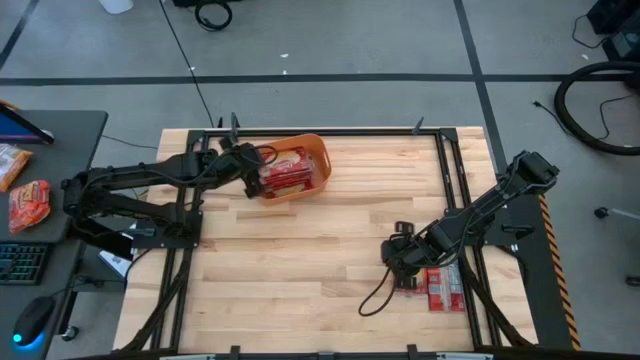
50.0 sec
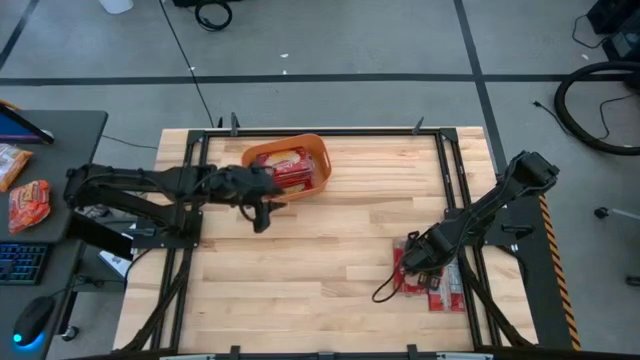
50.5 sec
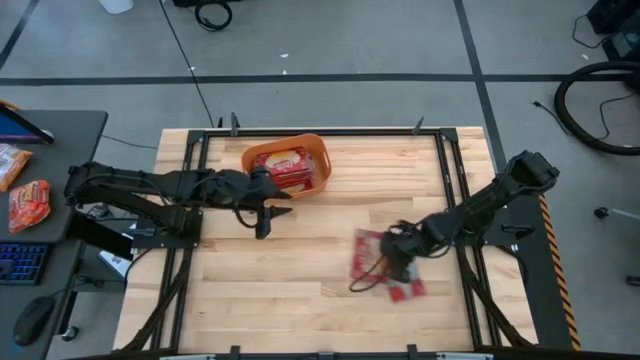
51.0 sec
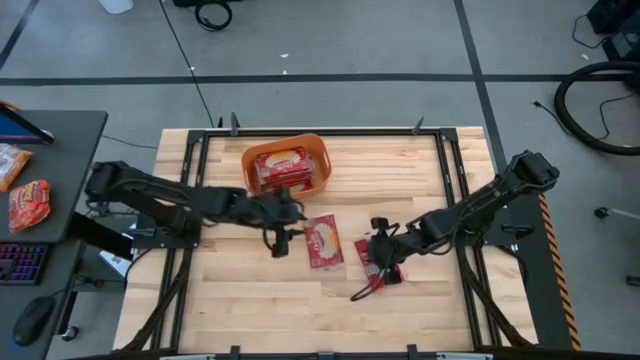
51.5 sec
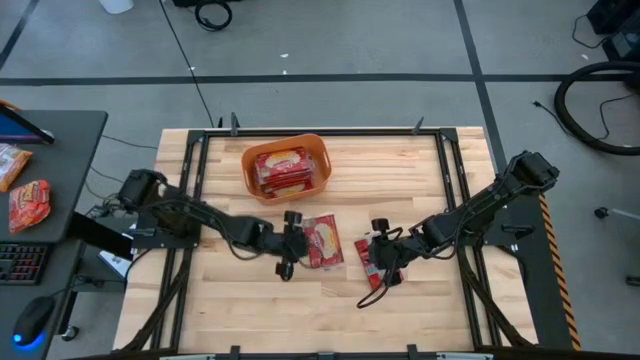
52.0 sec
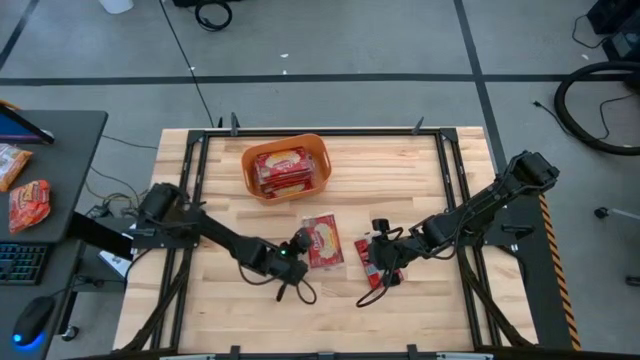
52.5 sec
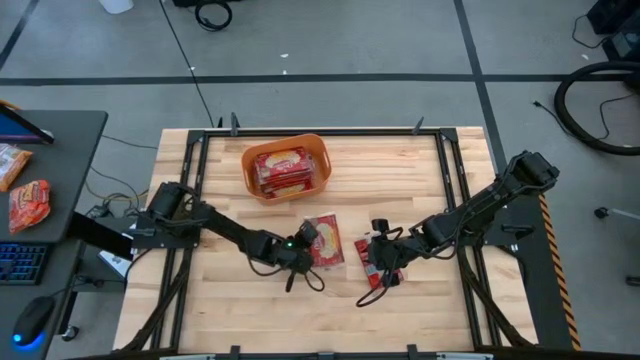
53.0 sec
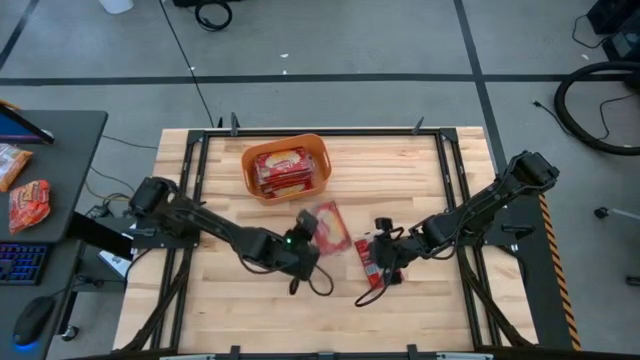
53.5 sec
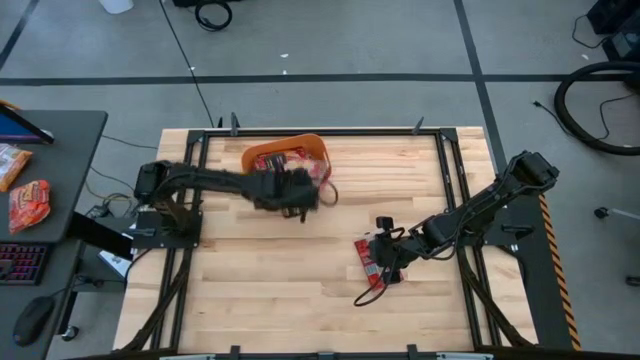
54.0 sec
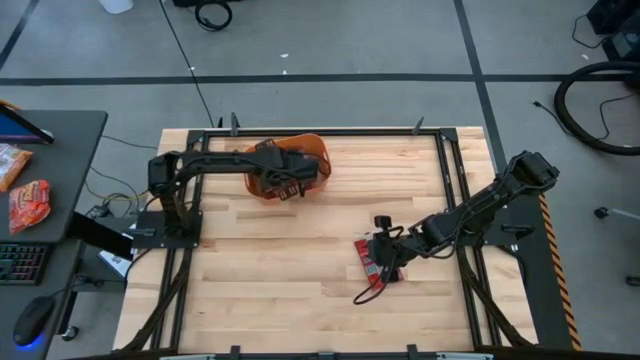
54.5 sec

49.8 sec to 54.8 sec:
Task: Sort popcorn bags into baskets
Put the popcorn bag into the orange bin

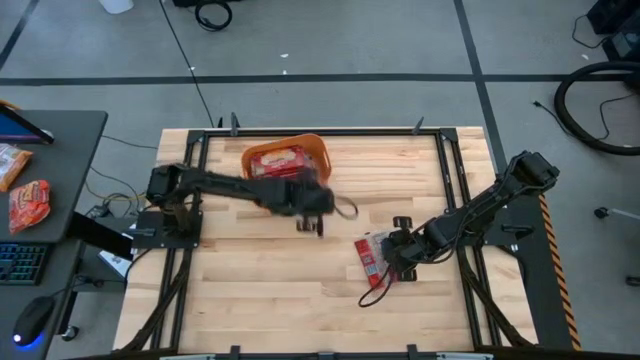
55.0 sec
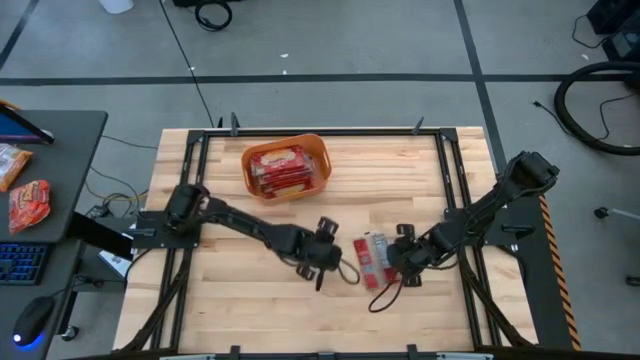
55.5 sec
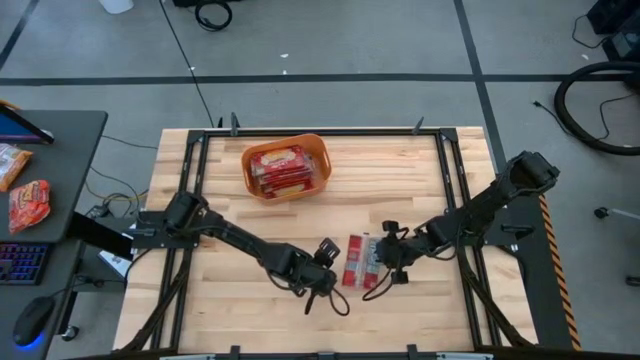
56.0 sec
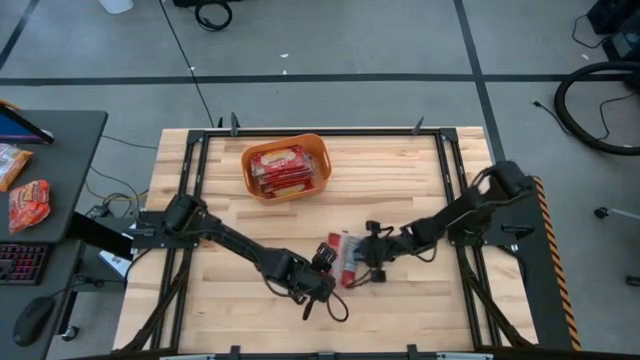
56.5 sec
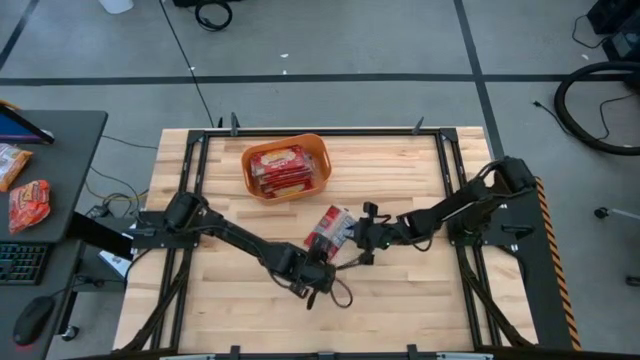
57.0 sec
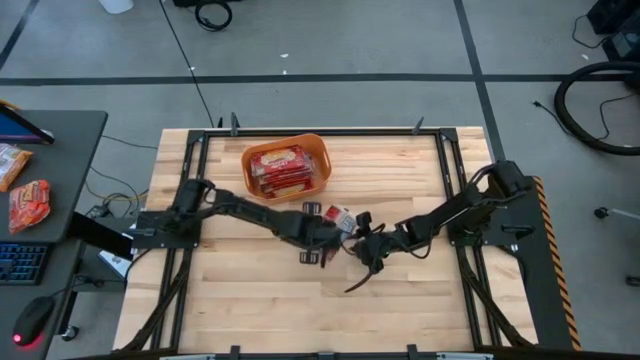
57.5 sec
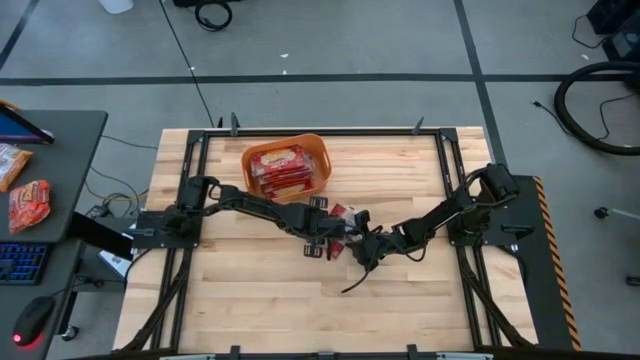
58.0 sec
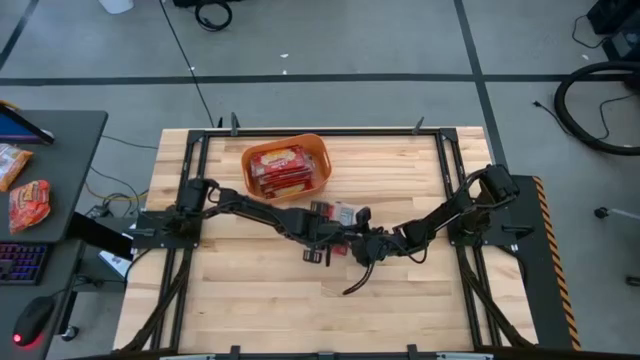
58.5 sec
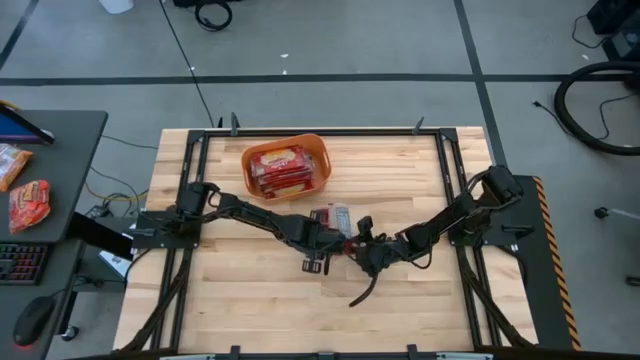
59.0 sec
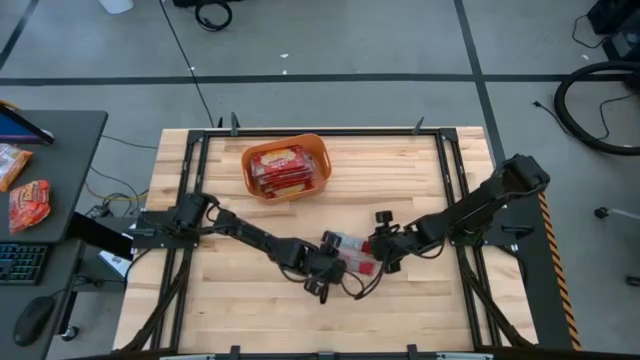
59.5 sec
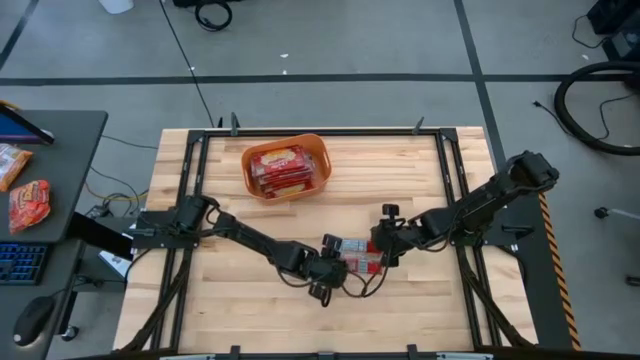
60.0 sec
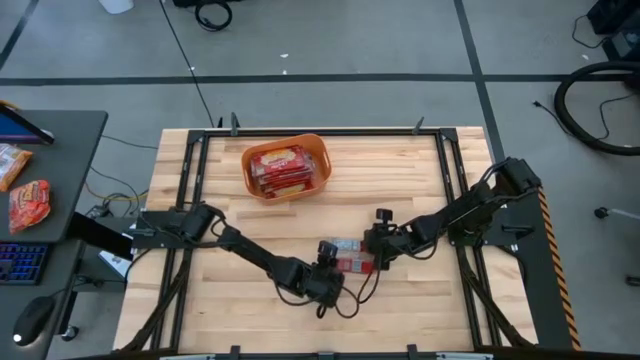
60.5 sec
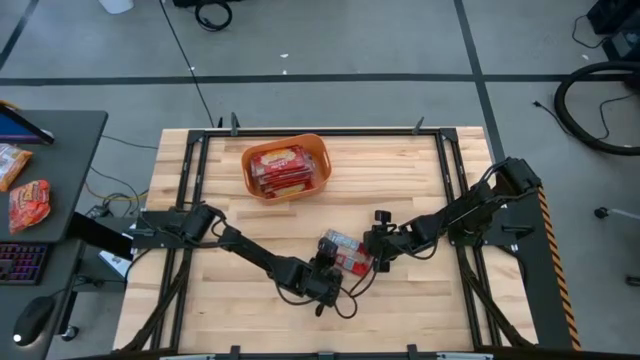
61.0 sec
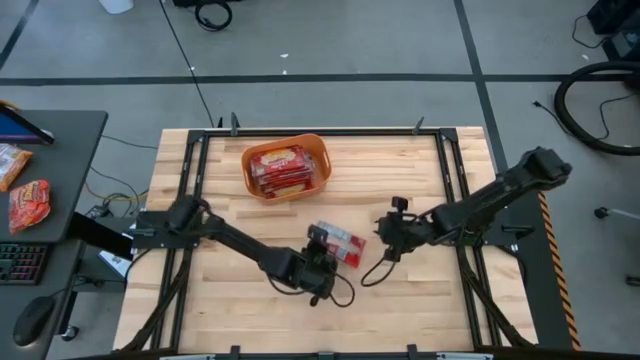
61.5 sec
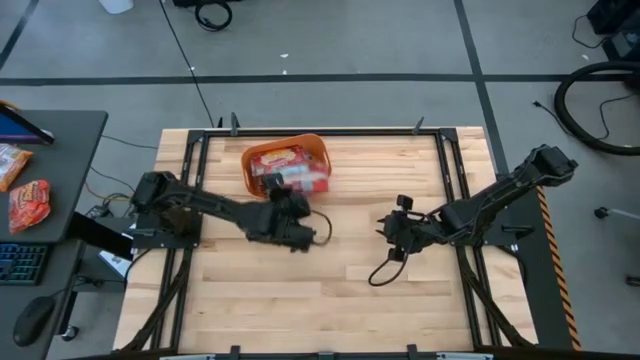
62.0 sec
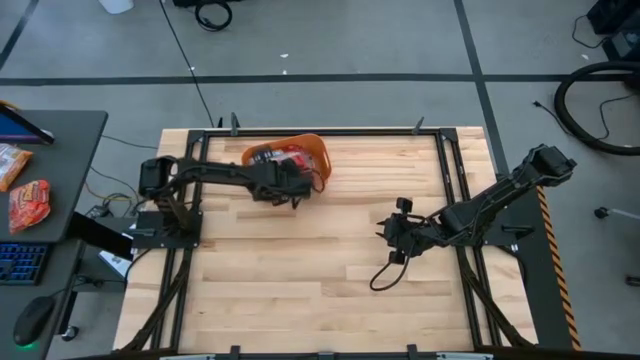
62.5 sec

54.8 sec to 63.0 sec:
Put the popcorn bag into the orange bin

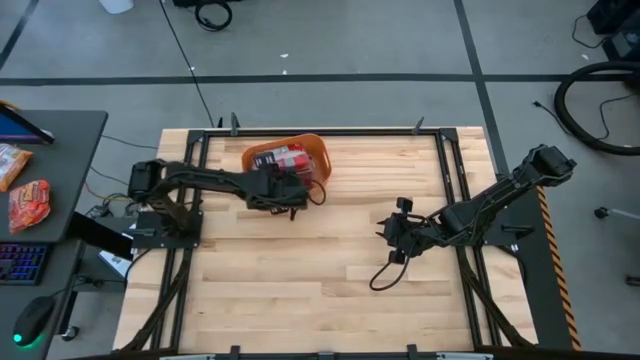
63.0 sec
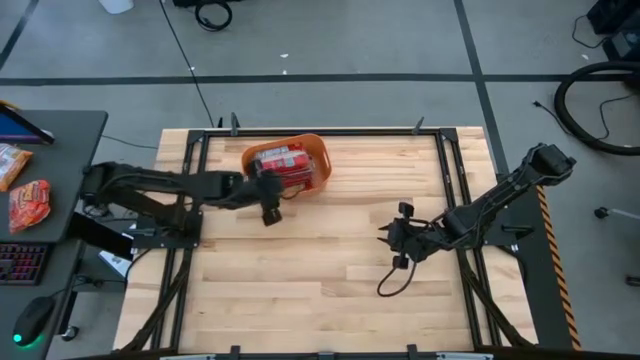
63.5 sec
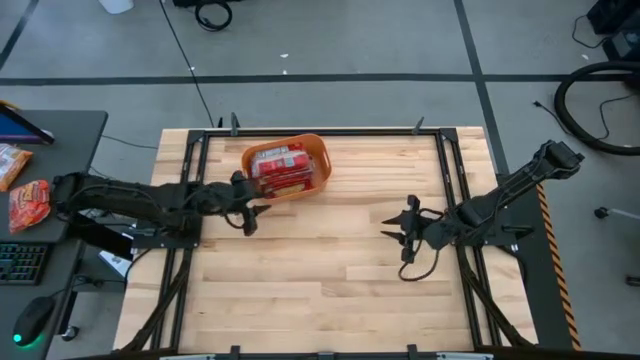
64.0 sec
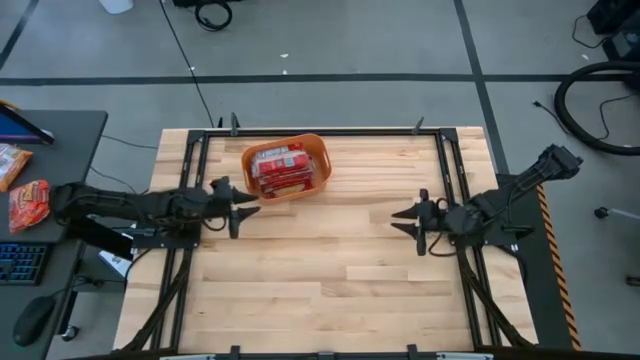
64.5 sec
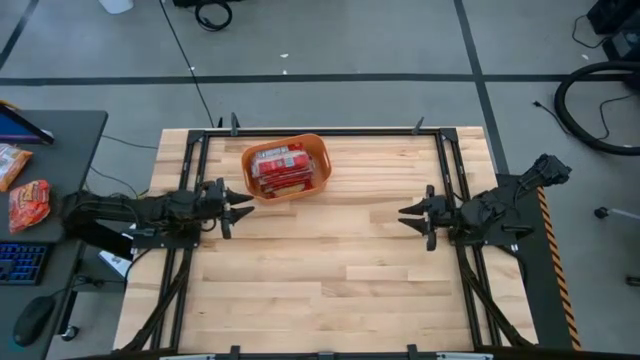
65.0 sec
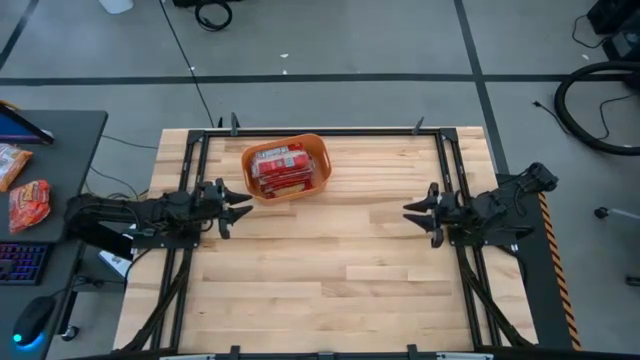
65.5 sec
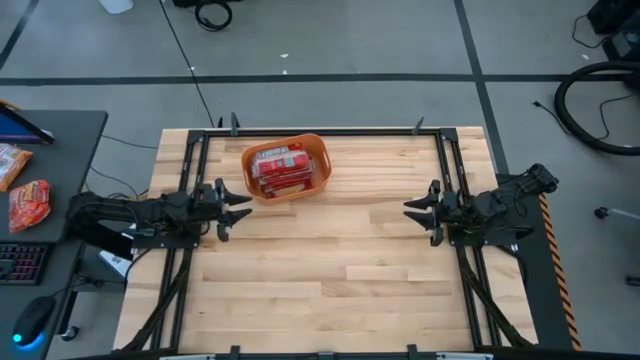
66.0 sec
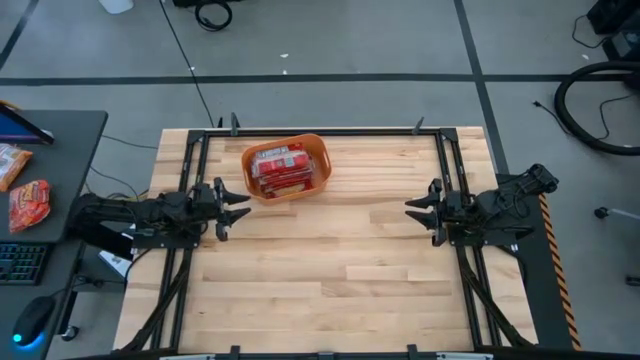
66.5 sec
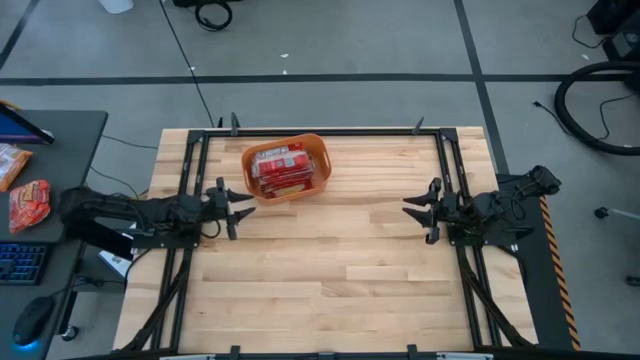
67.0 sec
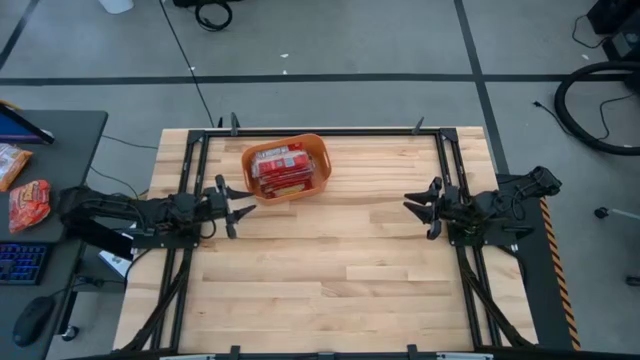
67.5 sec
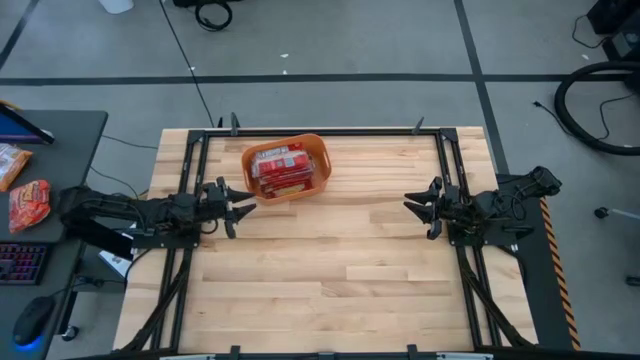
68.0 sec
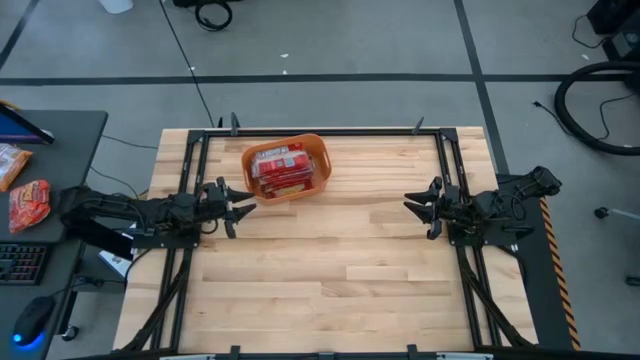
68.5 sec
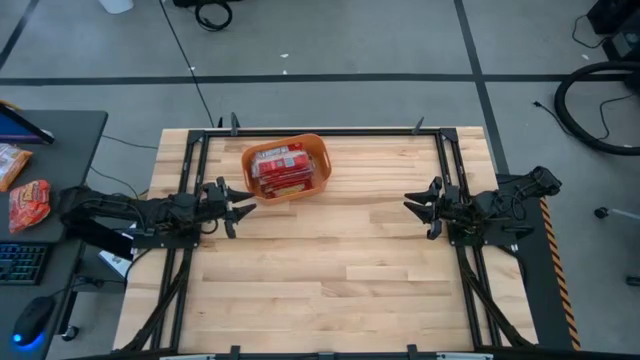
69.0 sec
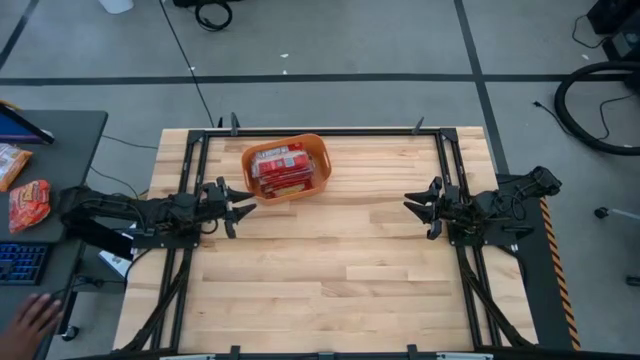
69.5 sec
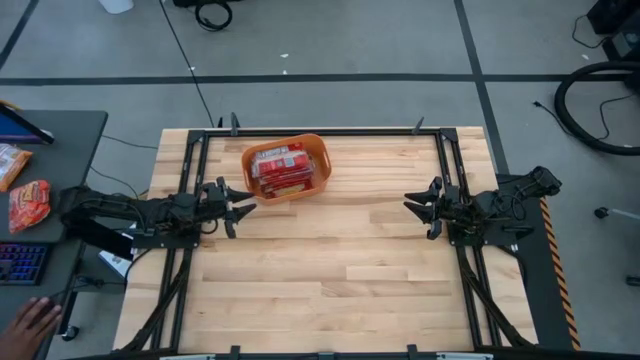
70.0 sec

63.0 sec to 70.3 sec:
Return to Home Position
